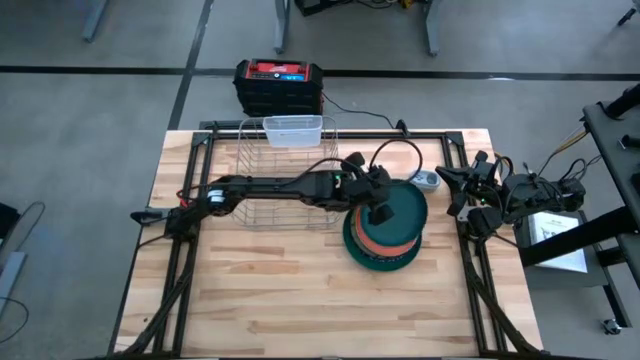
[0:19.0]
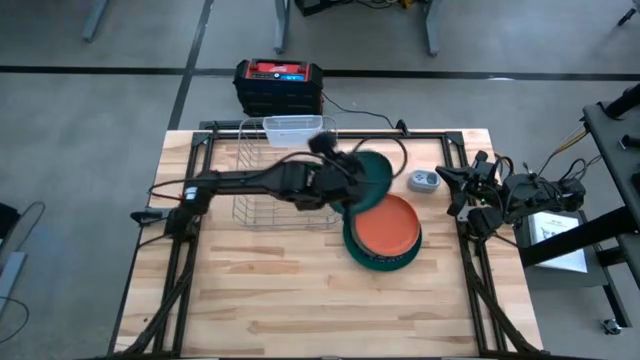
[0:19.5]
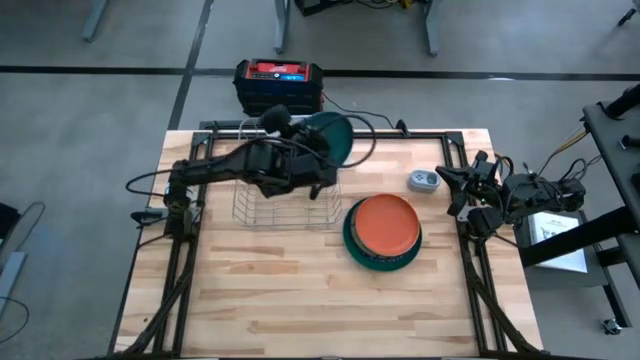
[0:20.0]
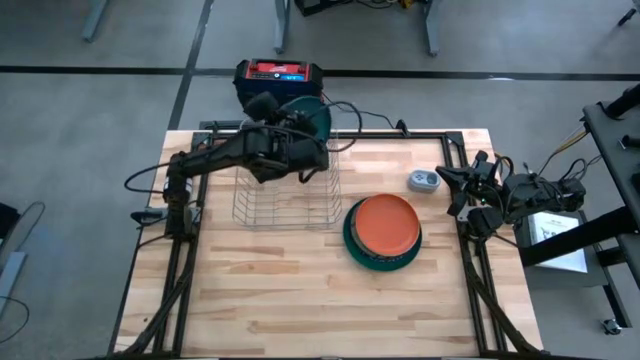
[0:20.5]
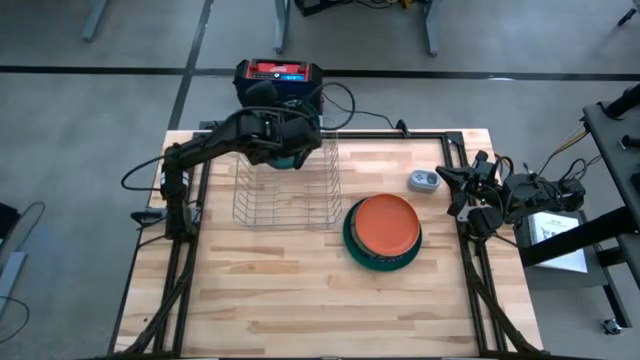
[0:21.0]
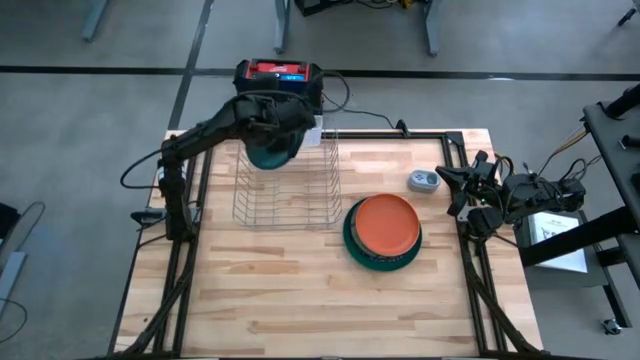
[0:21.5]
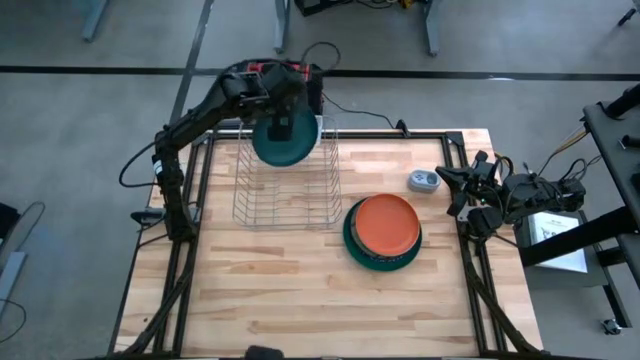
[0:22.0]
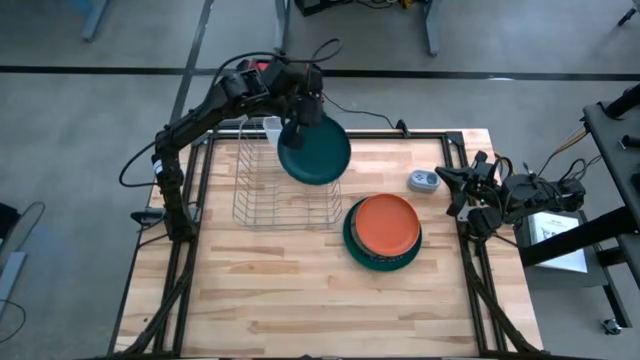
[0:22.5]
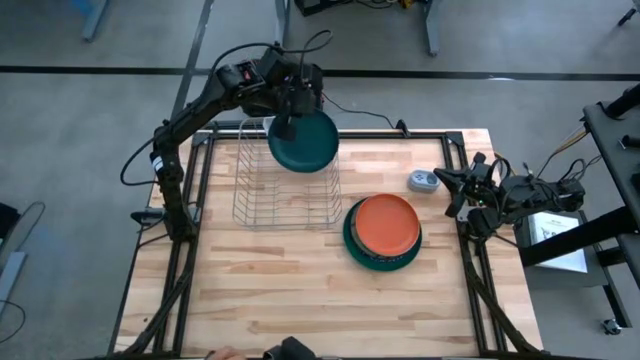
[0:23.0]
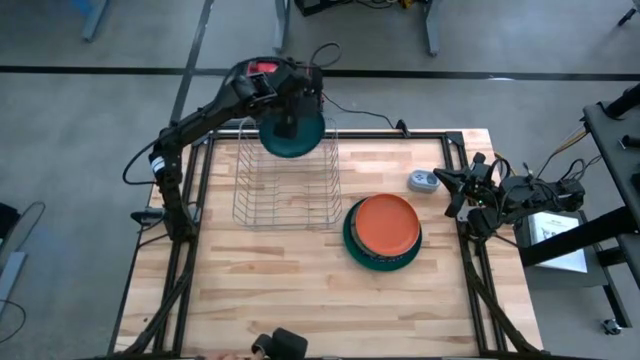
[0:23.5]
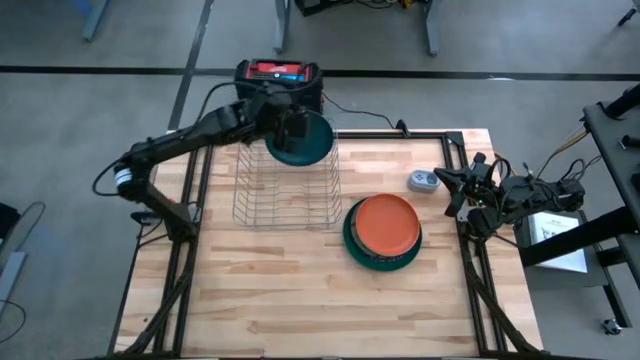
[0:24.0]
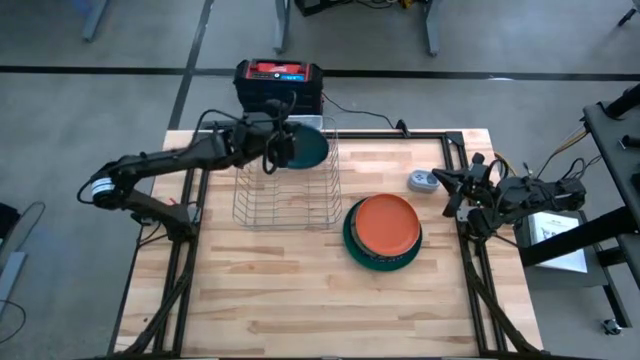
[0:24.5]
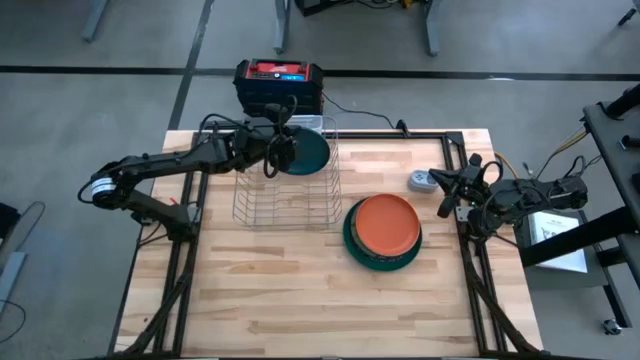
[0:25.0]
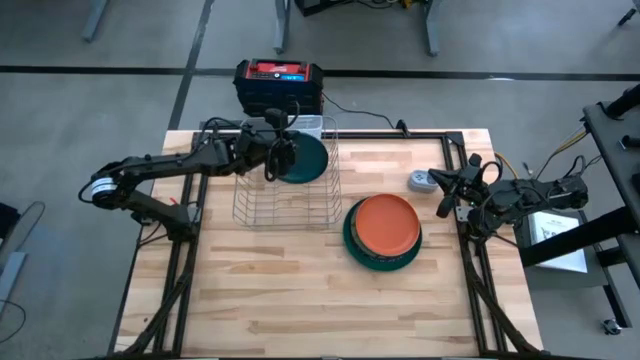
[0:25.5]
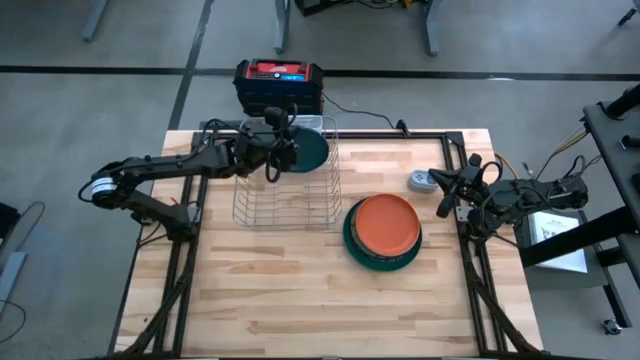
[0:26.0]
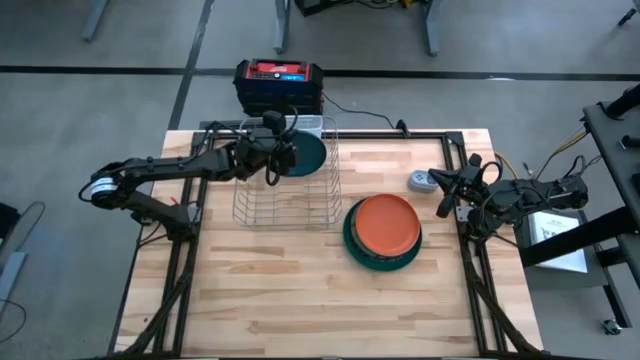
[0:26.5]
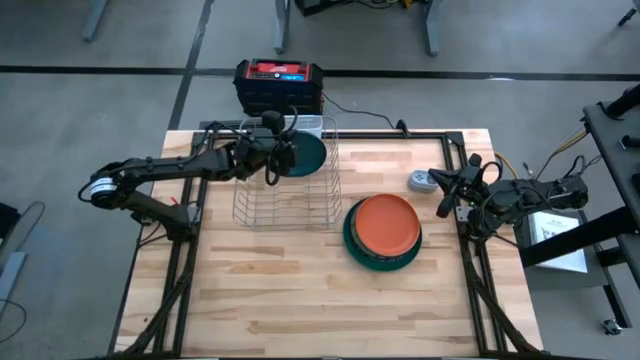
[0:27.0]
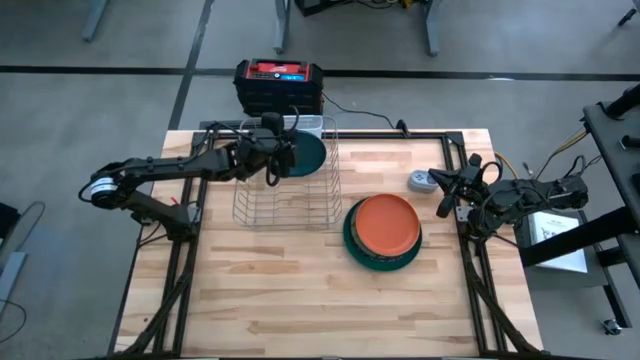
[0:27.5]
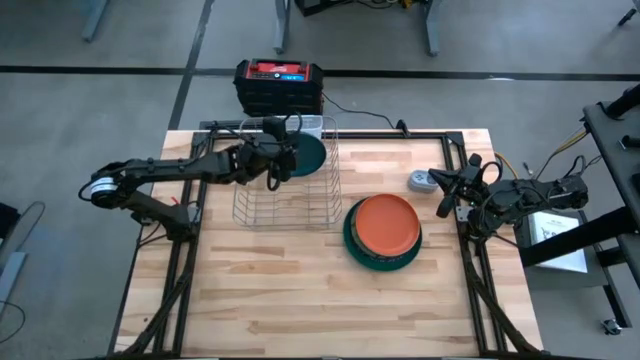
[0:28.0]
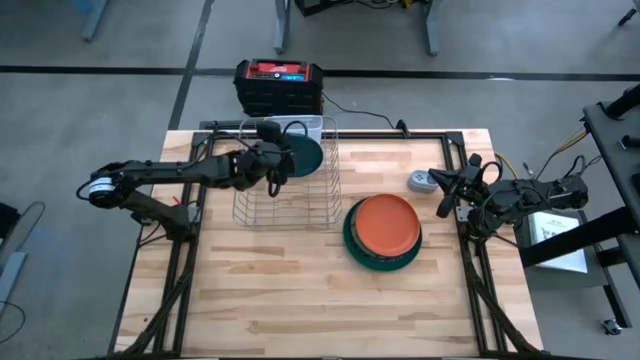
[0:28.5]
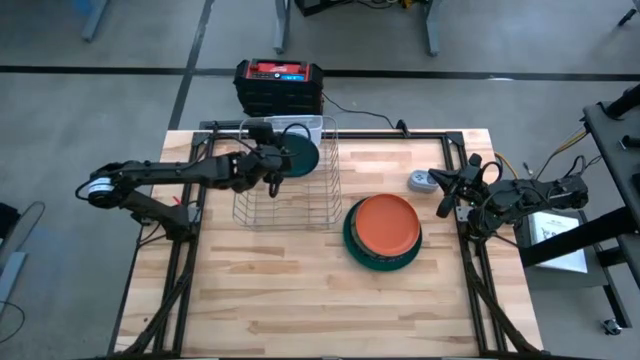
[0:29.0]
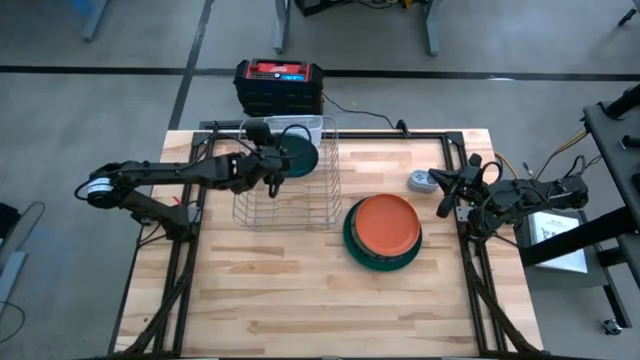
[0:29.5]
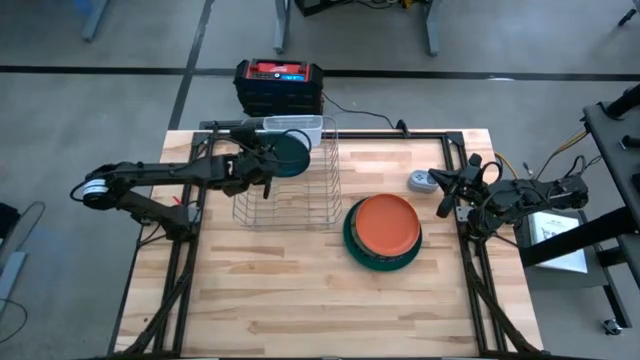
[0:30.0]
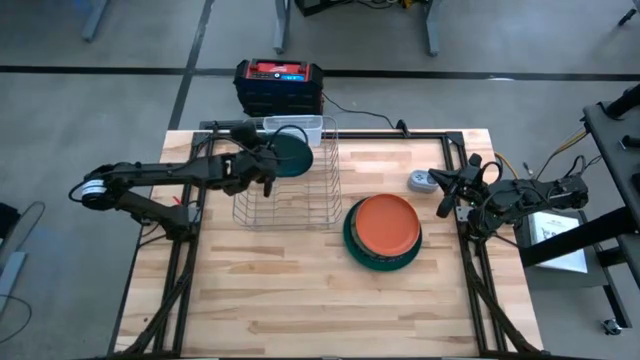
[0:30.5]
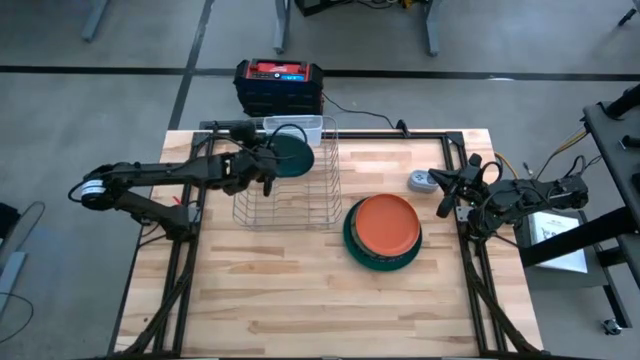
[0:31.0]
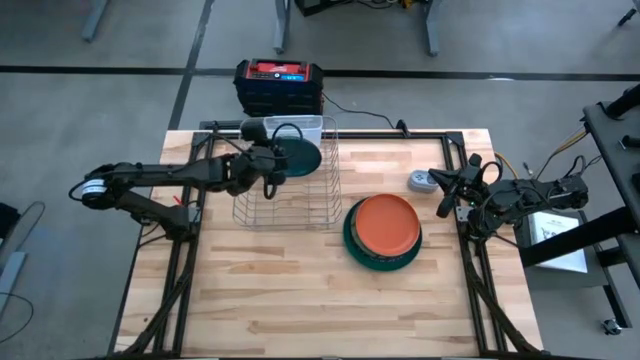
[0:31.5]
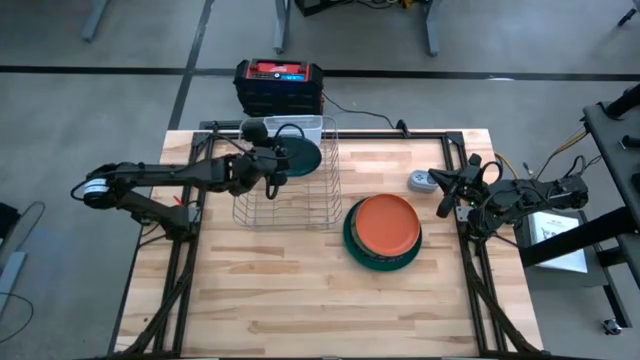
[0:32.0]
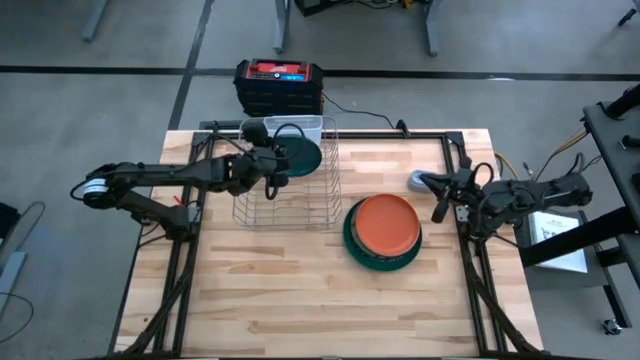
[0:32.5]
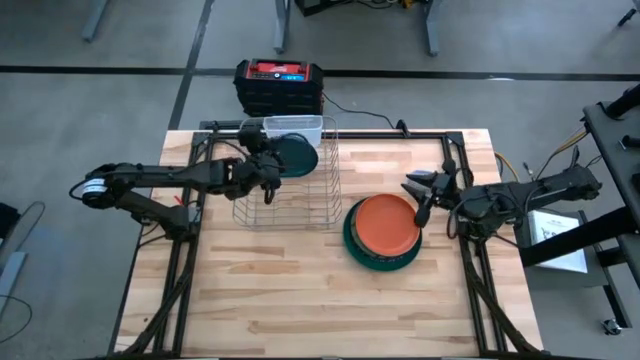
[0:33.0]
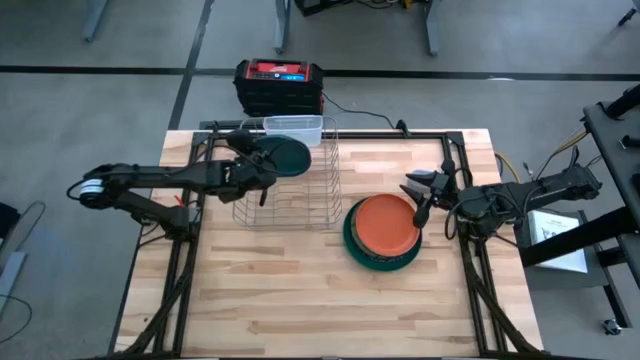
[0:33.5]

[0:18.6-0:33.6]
Task: Sort dishes
Put the dark green plate into the dish rack

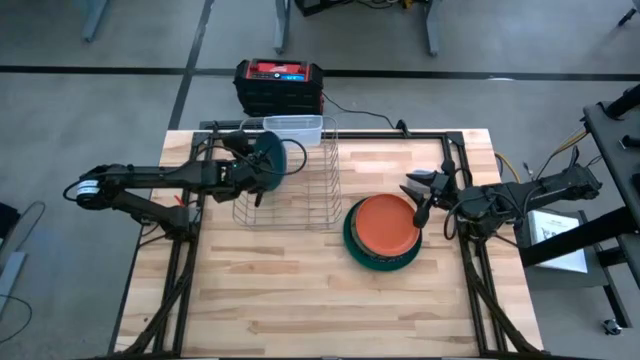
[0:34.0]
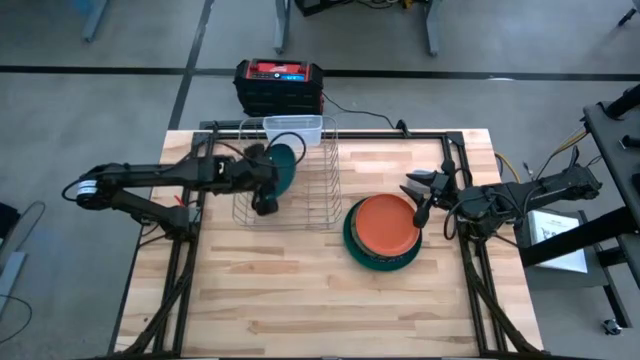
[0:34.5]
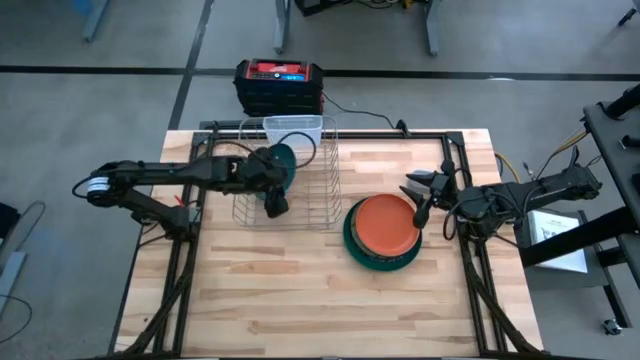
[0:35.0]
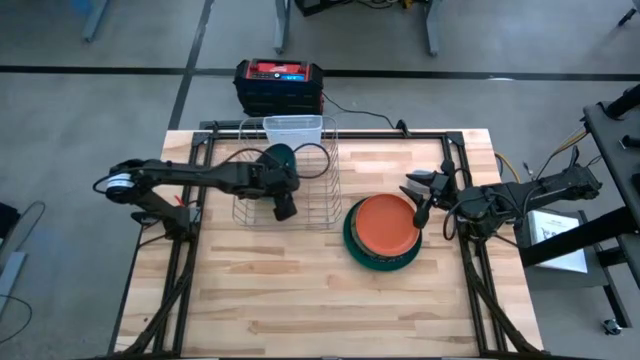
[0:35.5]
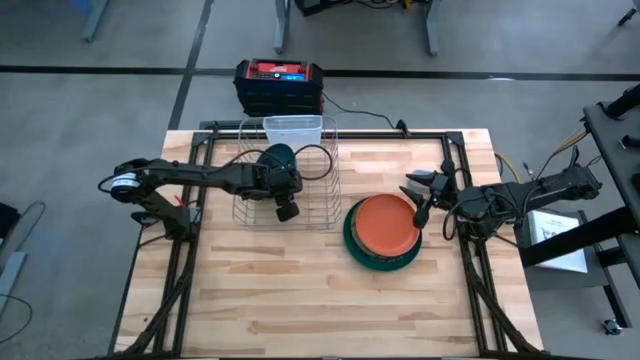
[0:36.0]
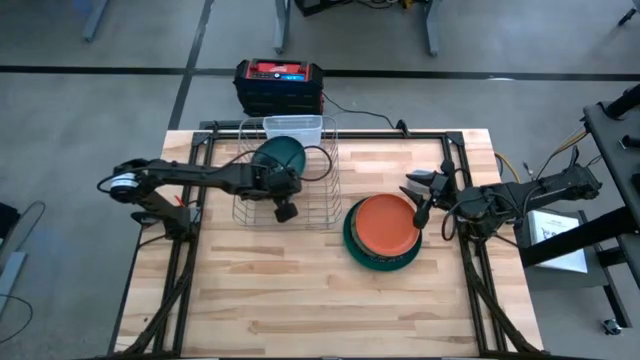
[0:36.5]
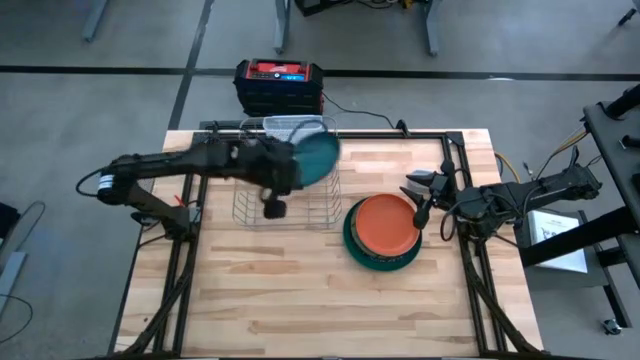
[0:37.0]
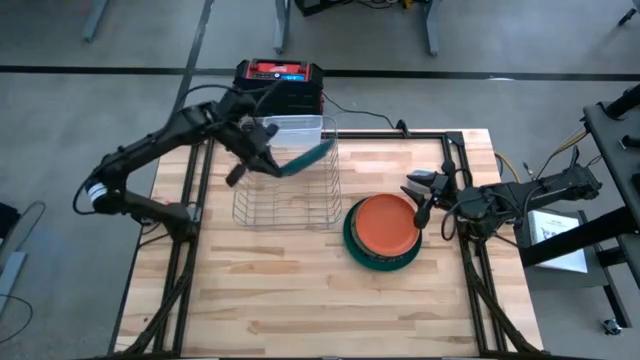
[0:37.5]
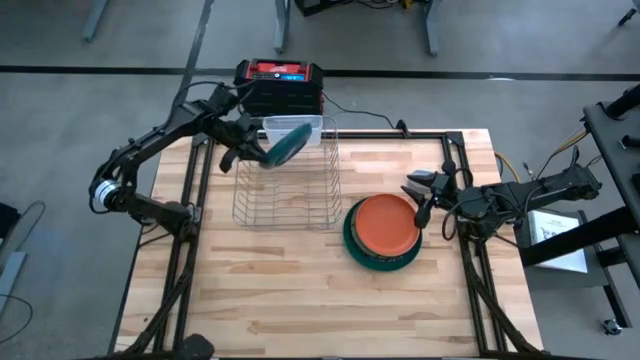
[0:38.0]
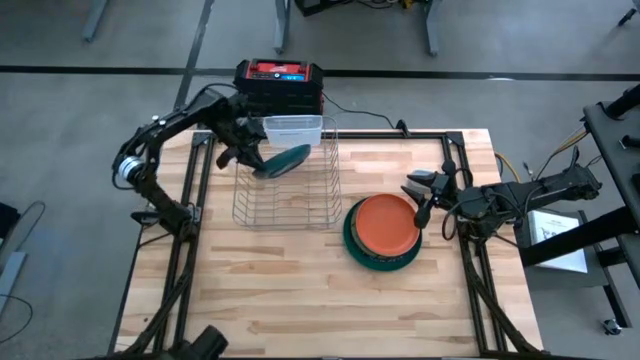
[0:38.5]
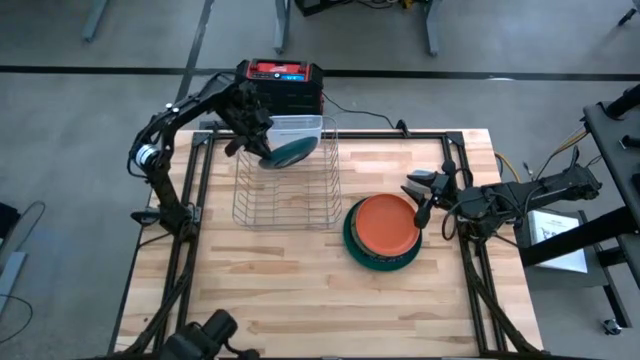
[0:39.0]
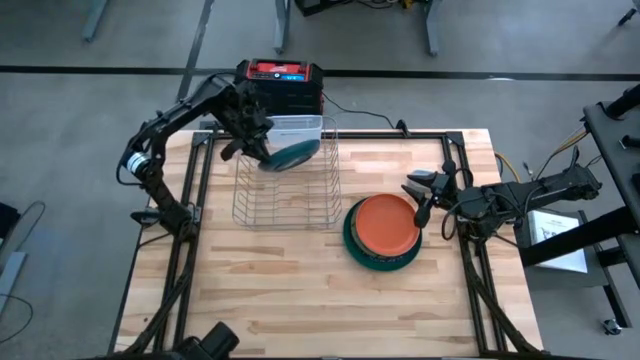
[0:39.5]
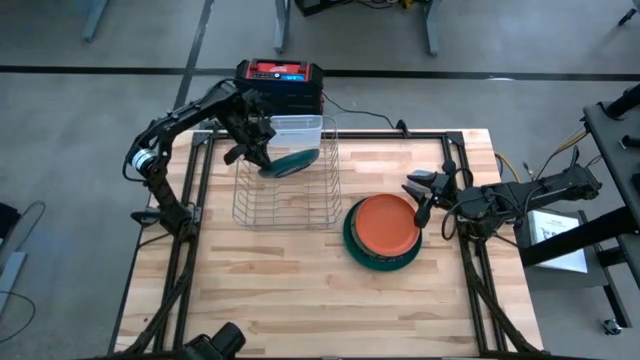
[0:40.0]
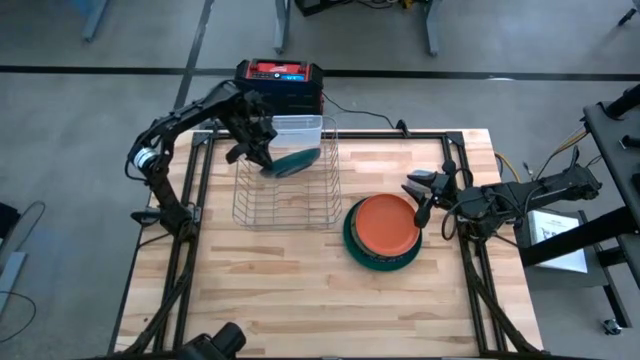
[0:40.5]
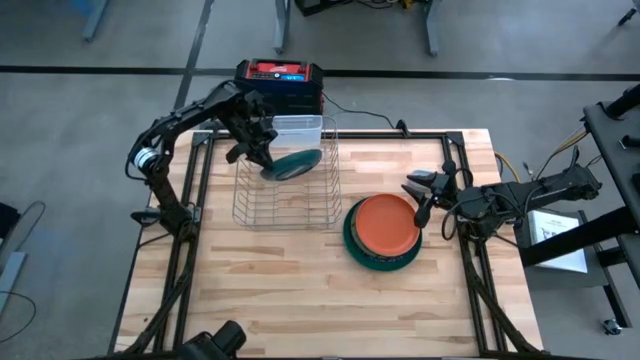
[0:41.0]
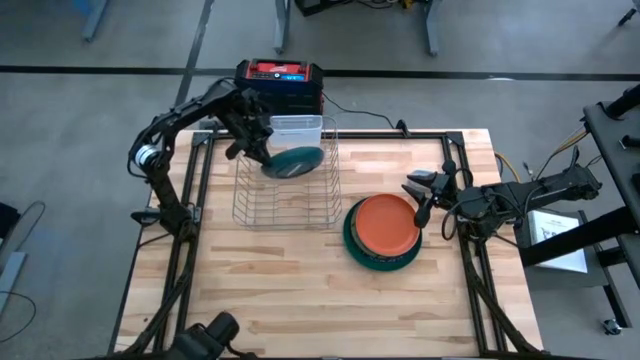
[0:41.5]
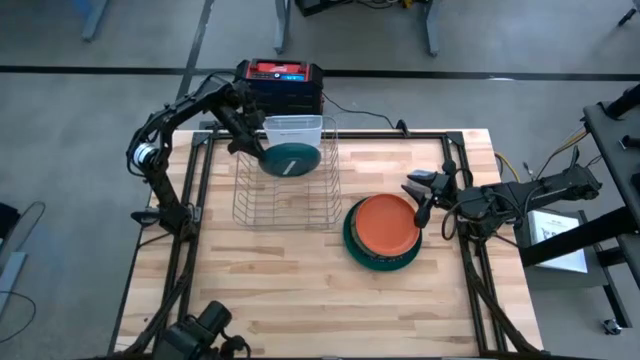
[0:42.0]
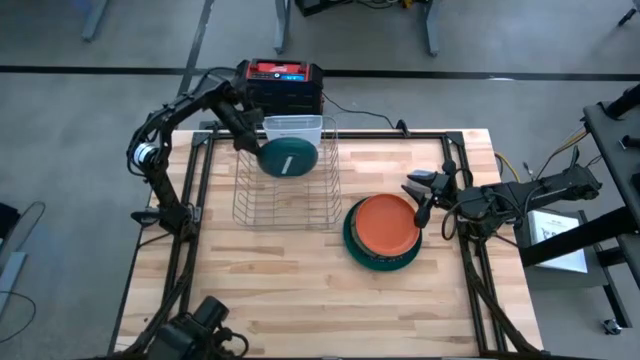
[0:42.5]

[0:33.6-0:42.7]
Put the dark green plate into the dish rack
